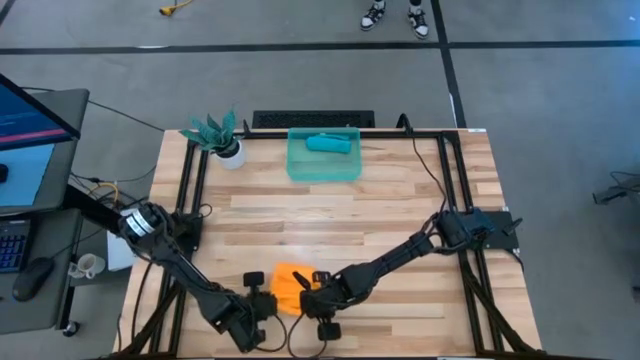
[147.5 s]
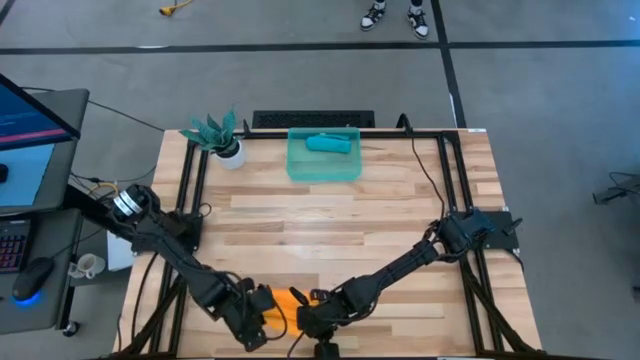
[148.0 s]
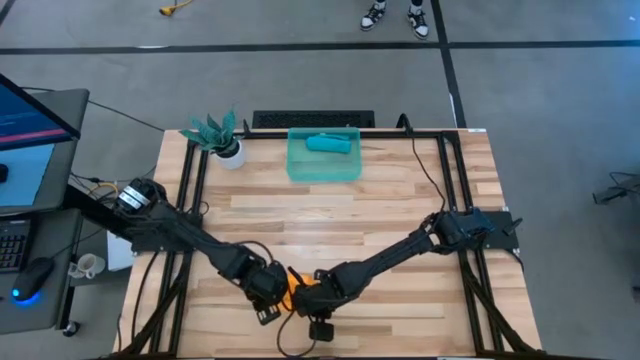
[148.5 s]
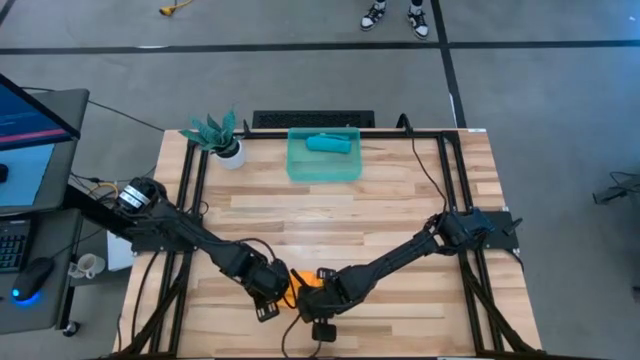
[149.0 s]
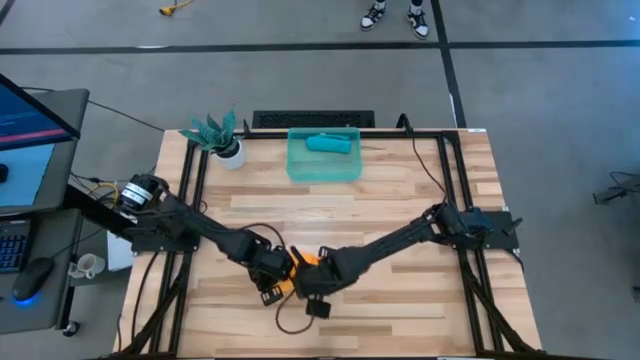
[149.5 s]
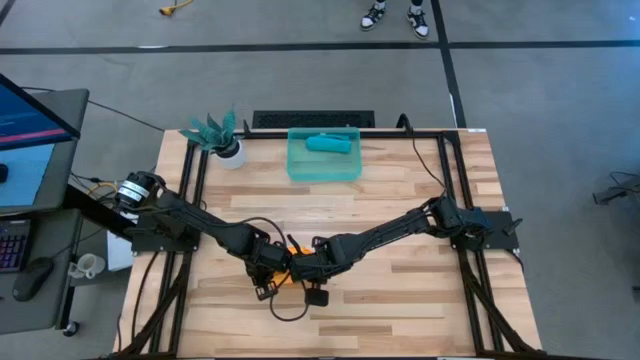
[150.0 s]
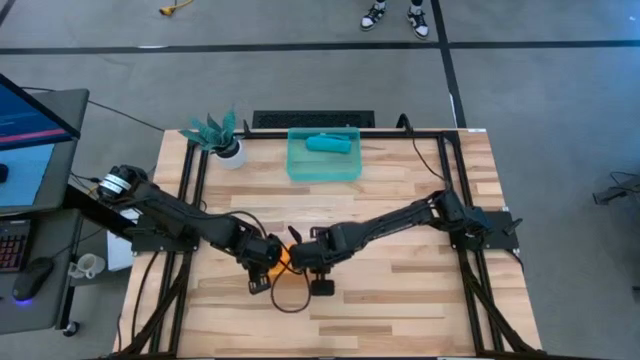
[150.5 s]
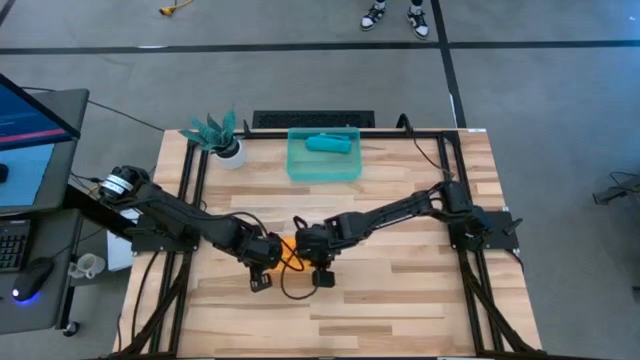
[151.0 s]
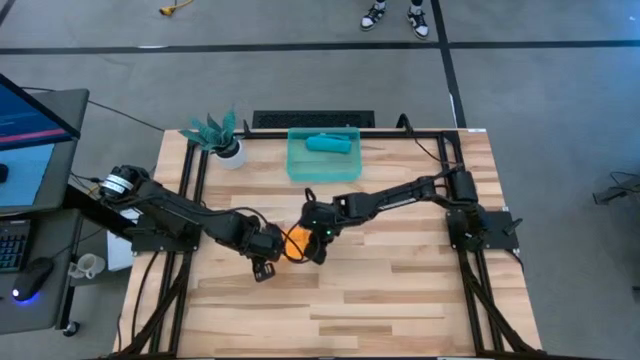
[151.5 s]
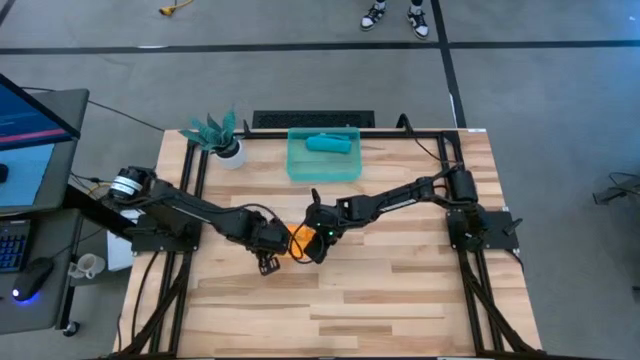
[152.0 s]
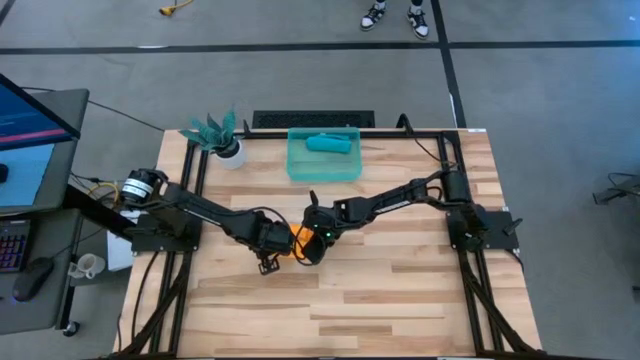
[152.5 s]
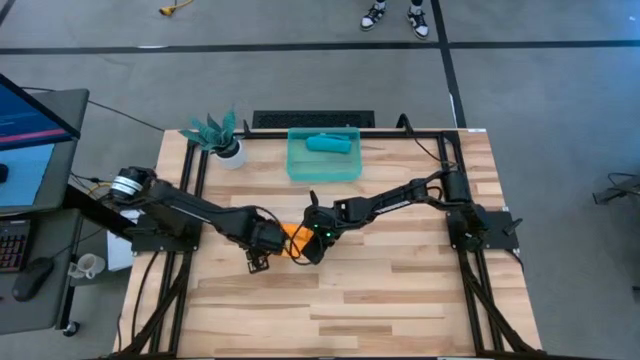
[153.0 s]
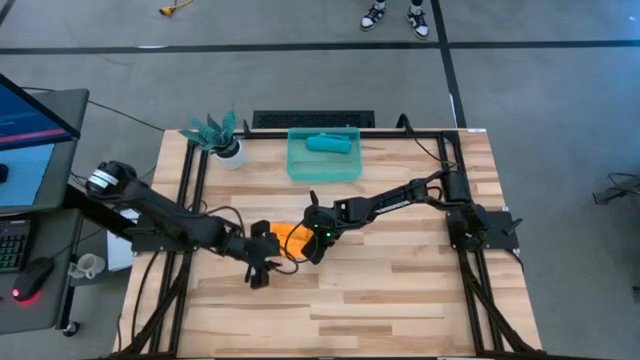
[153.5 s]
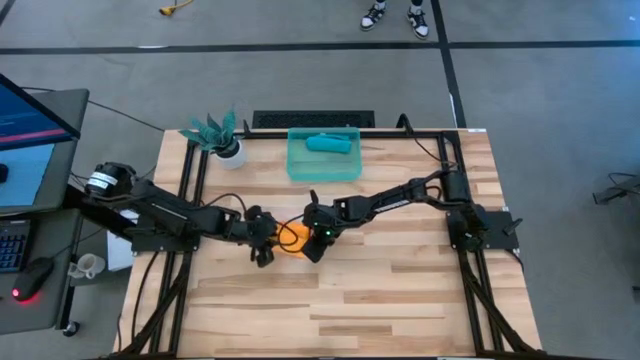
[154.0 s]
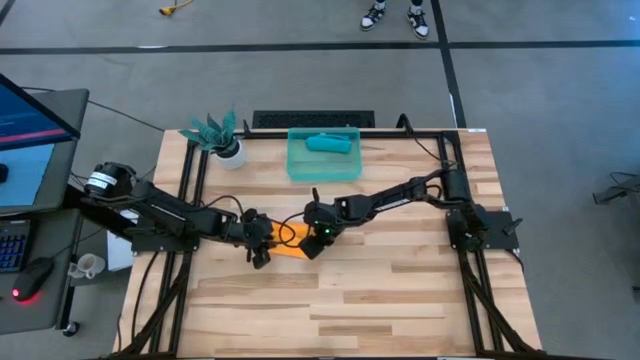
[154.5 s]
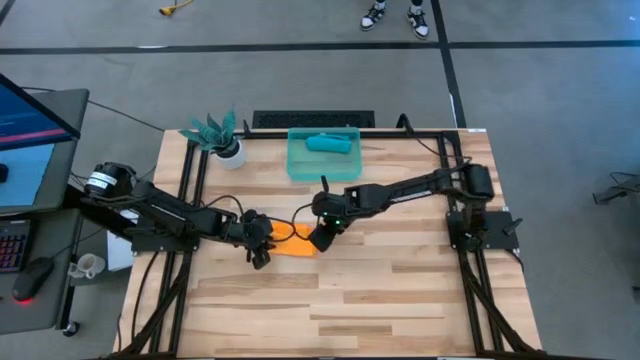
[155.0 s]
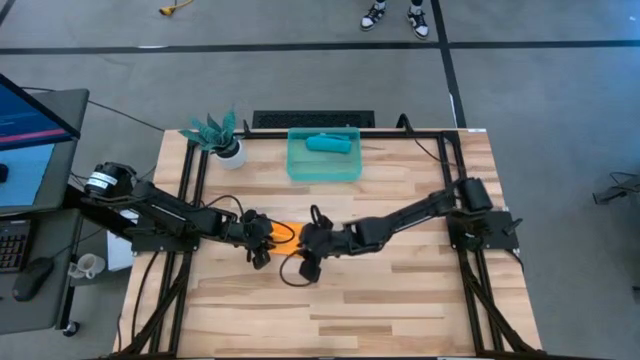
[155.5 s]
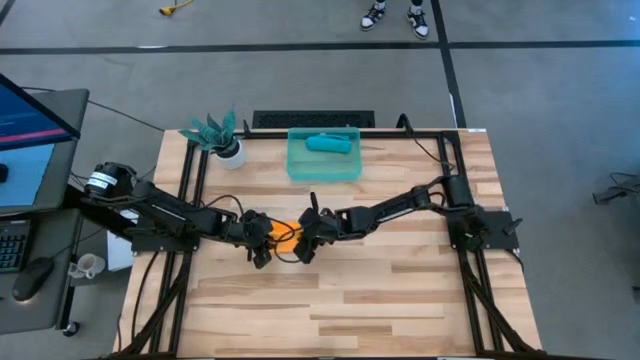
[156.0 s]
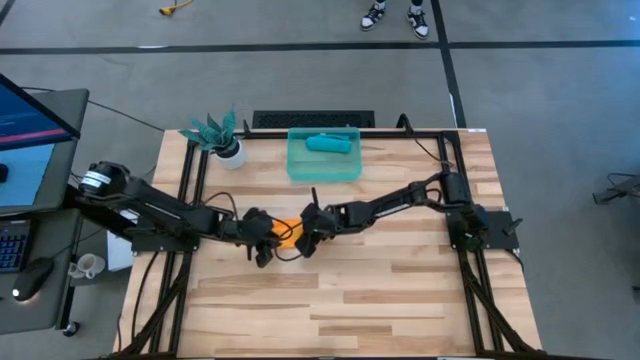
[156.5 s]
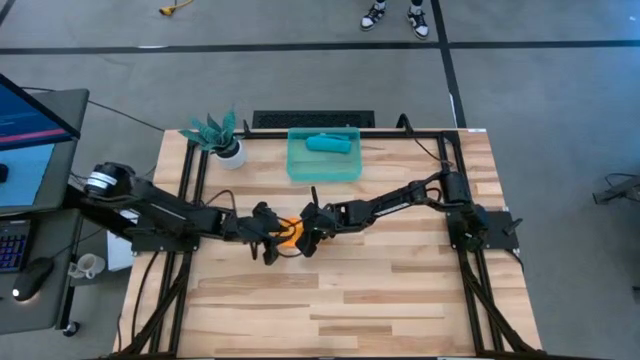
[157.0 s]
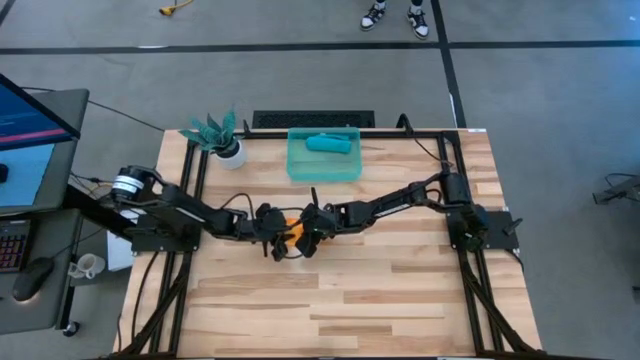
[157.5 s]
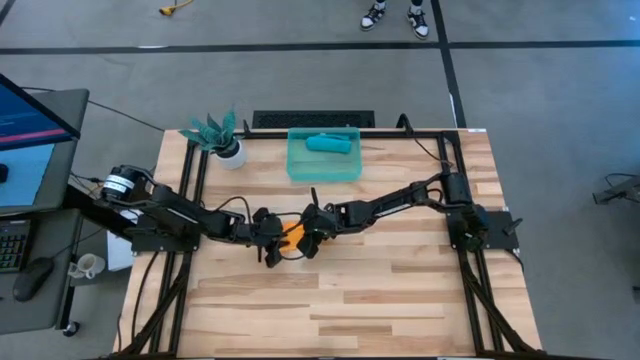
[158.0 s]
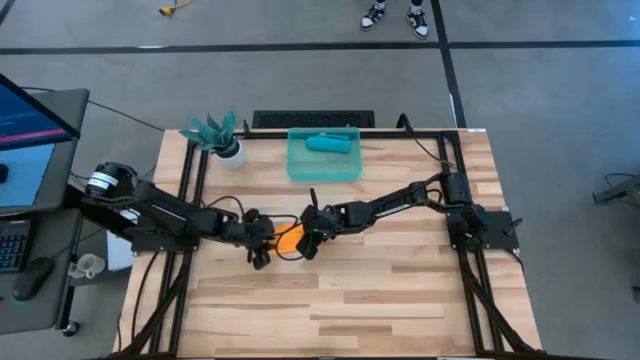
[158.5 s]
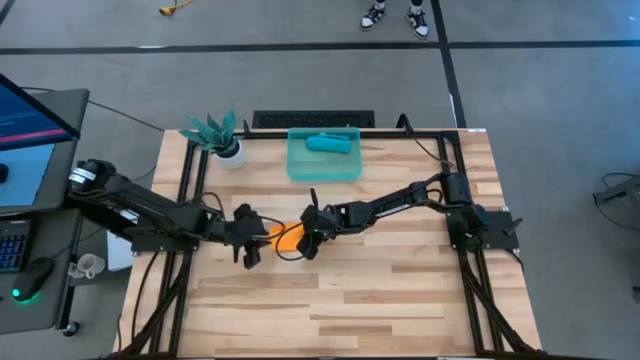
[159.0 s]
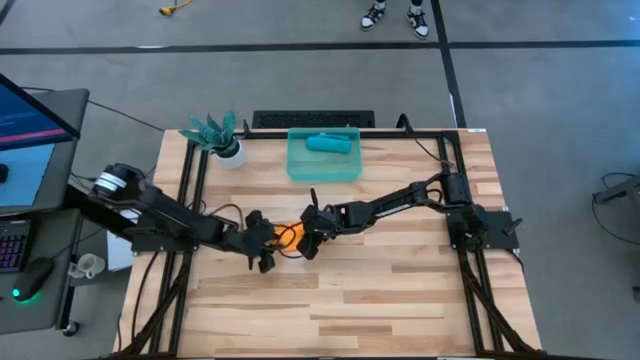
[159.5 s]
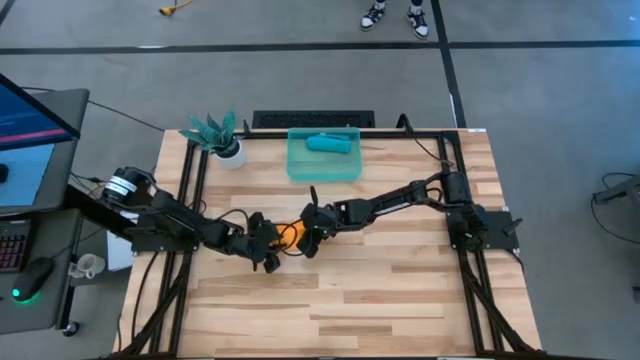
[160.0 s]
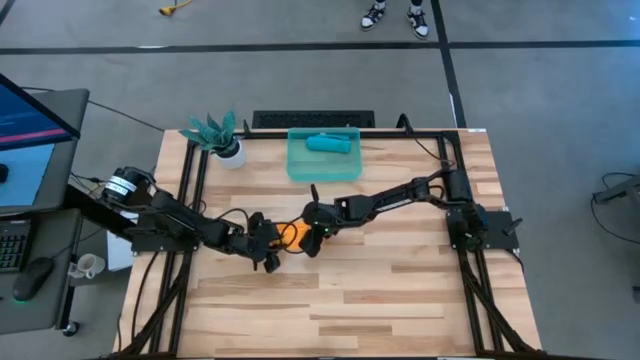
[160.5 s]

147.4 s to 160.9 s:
Task: Roll microfiber towels into tight, uniform cylinder then place into a basket
Roll the yellow microfiber cloth

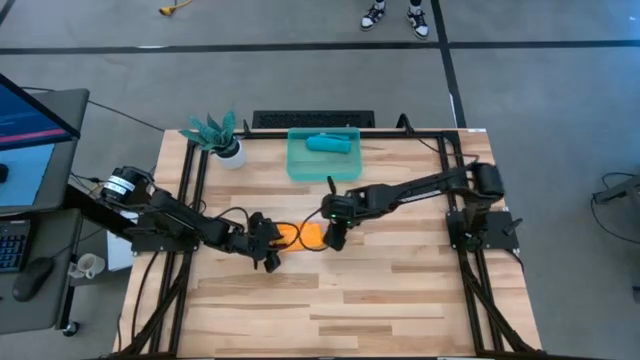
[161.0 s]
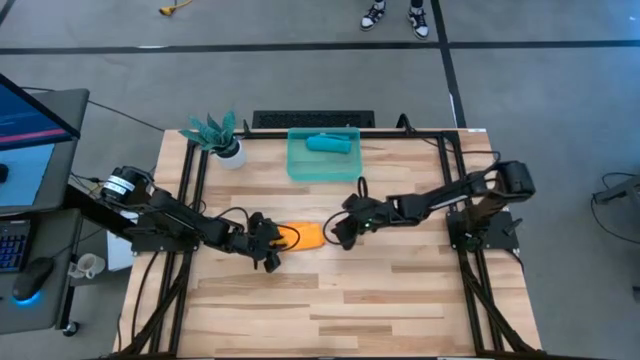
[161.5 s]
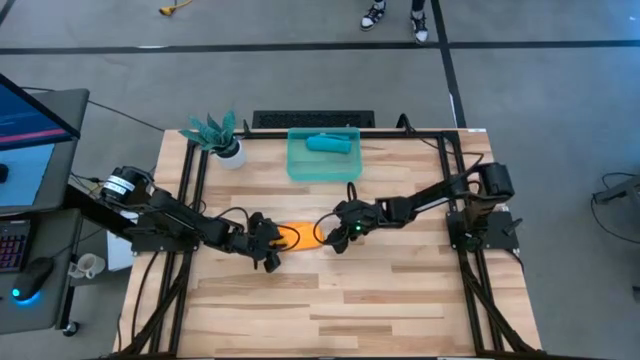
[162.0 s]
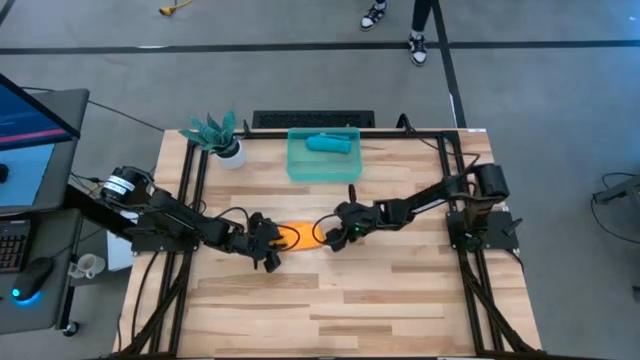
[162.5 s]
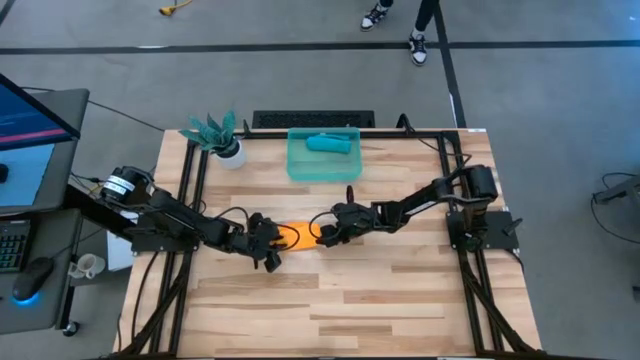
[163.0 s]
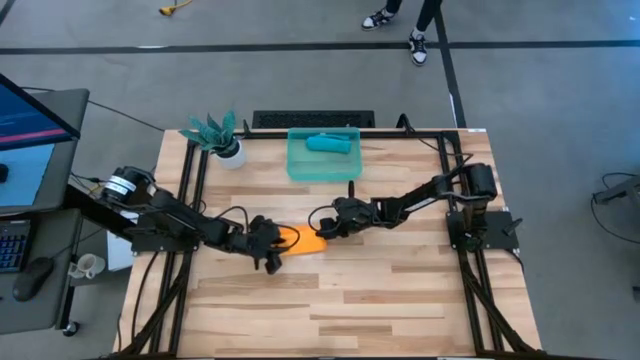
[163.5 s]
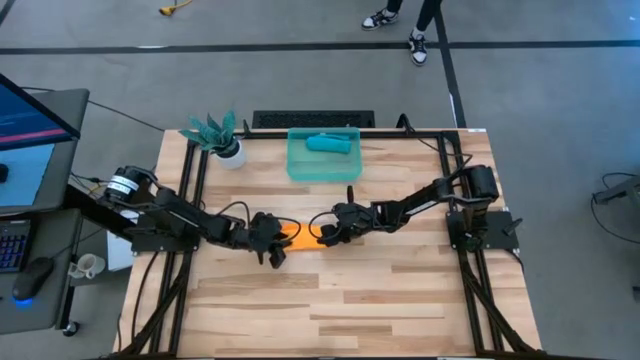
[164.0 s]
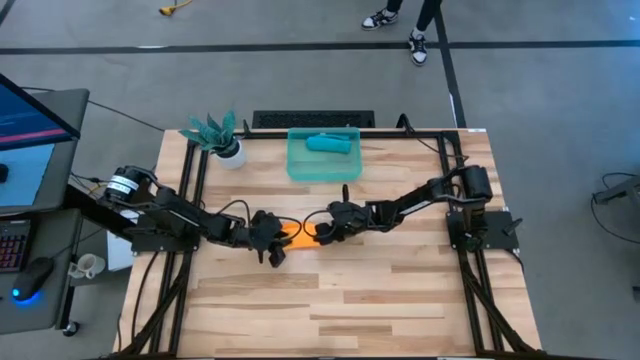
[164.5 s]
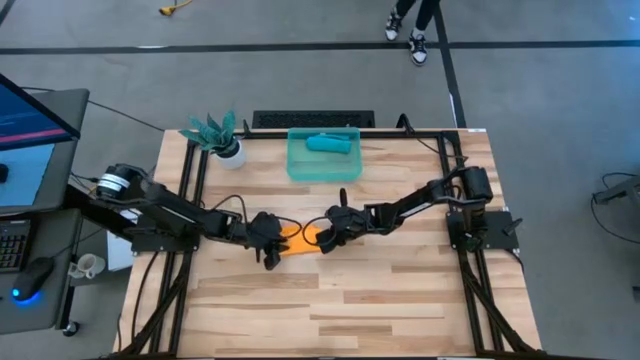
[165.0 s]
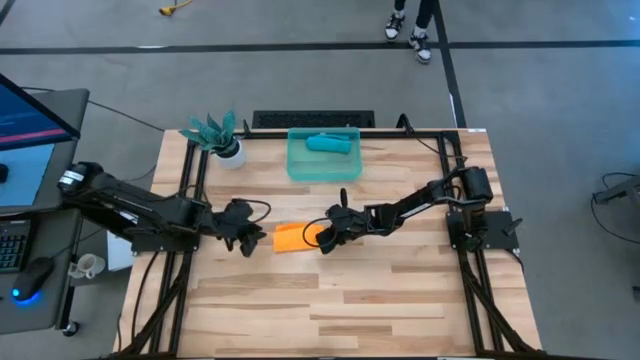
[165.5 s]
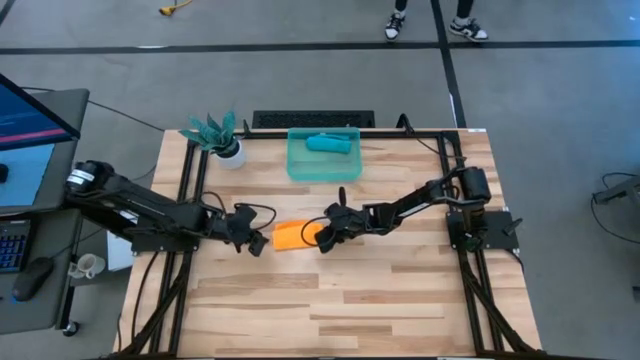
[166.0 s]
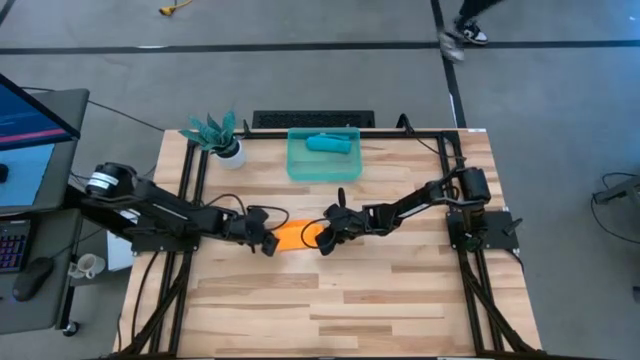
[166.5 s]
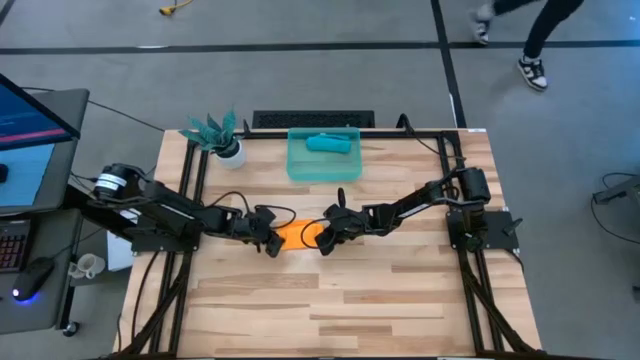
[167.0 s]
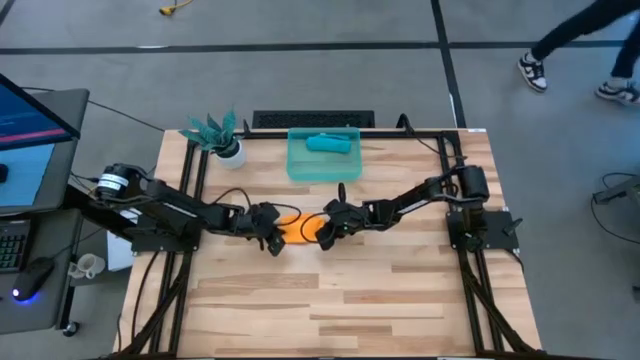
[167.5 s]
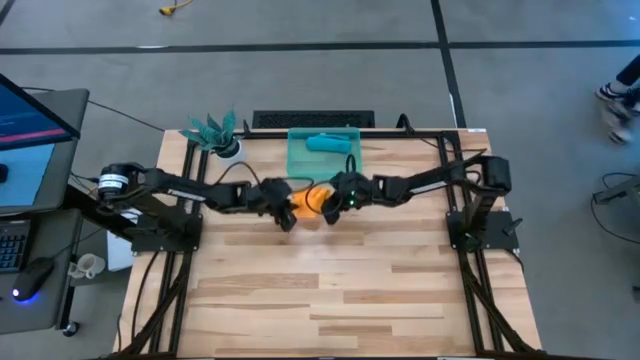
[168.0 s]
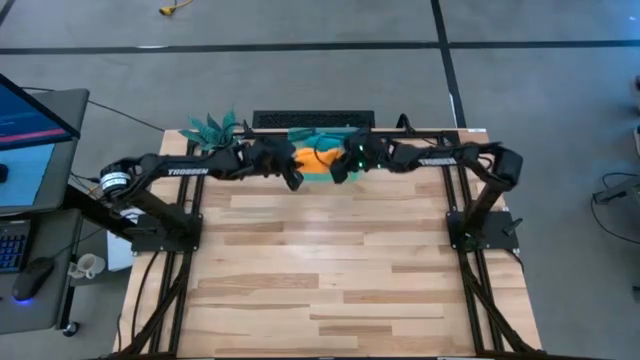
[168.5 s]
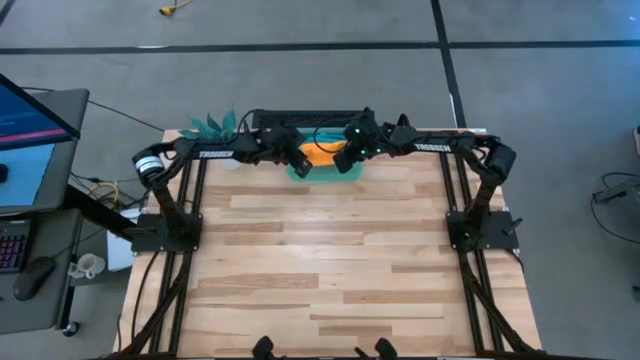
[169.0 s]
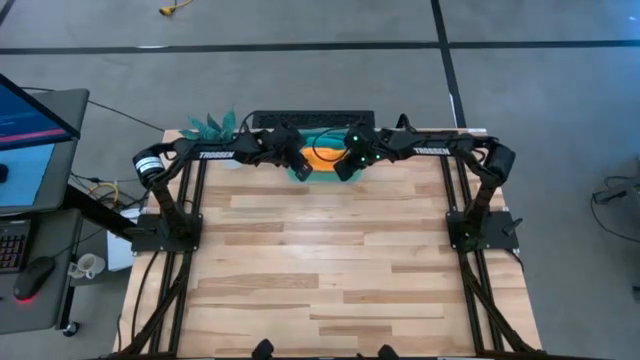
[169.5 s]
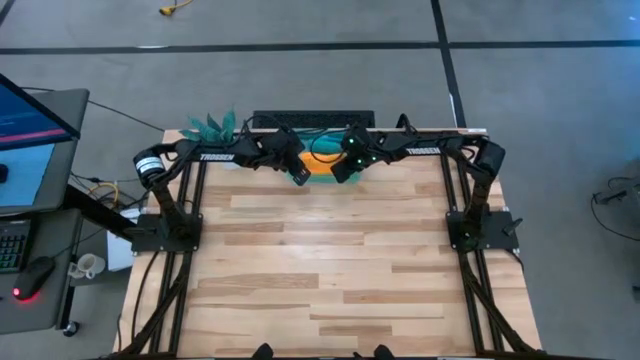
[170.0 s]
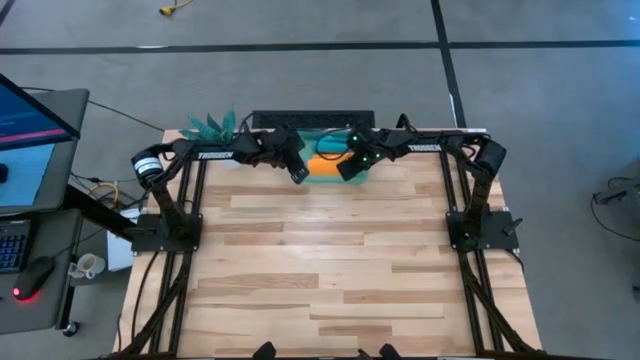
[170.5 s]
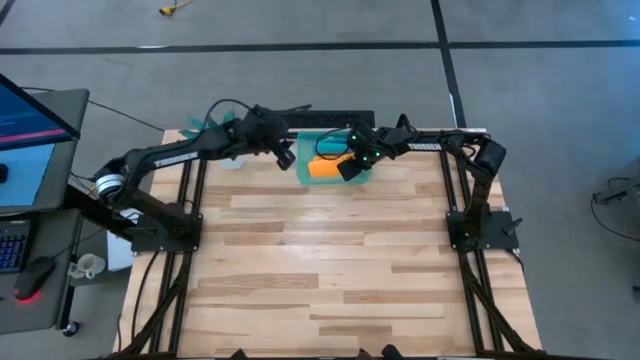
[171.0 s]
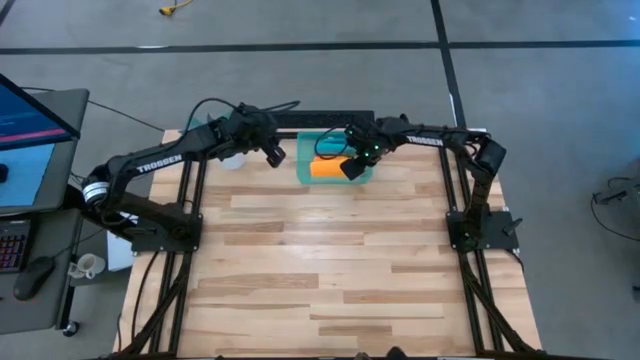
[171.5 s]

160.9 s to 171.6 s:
Put the yellow microfiber cloth into the green bin
